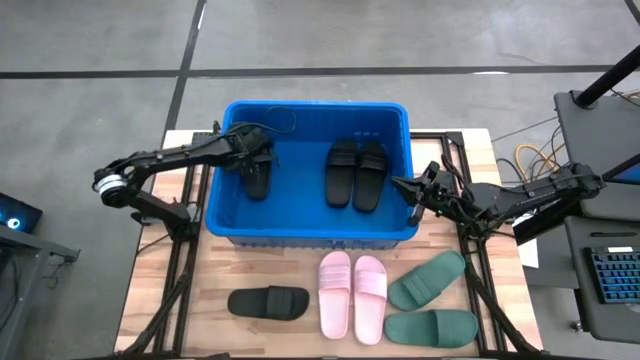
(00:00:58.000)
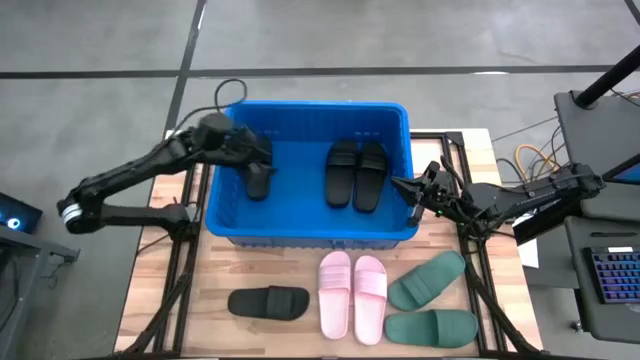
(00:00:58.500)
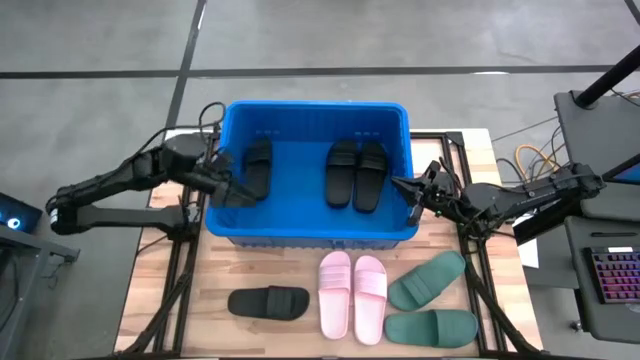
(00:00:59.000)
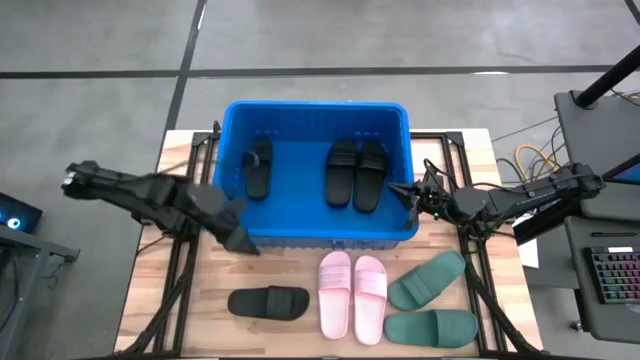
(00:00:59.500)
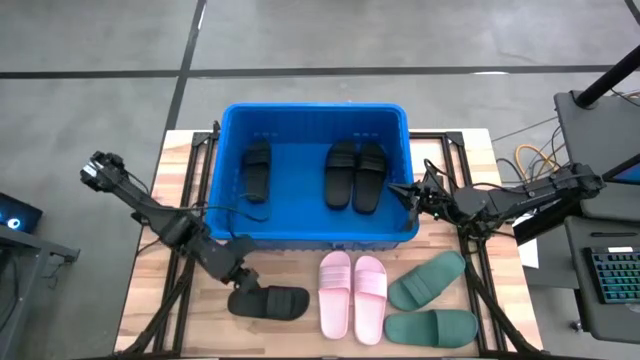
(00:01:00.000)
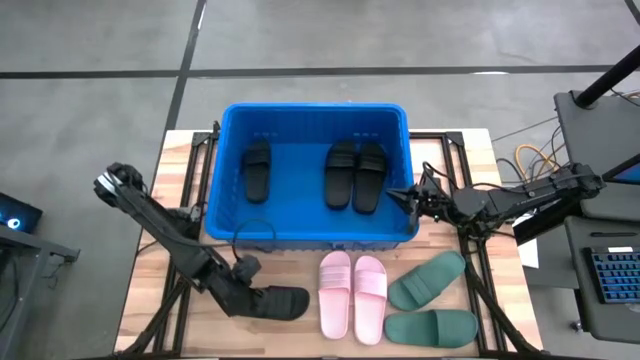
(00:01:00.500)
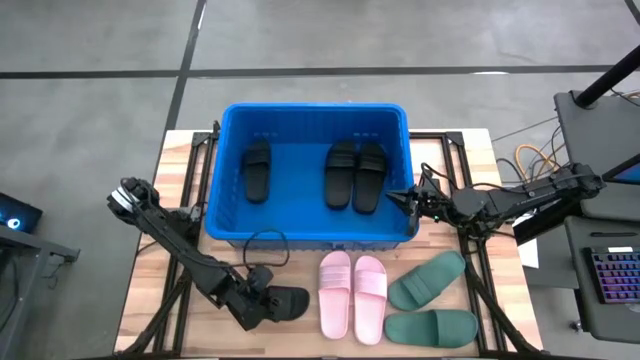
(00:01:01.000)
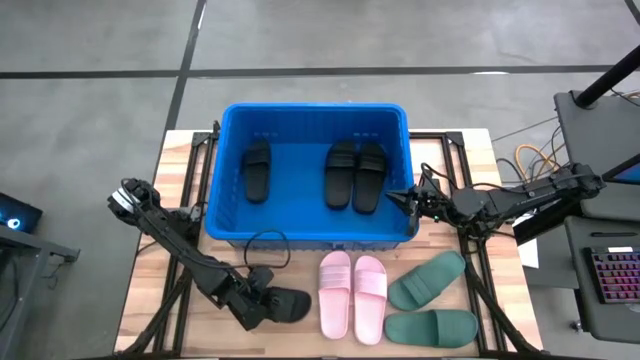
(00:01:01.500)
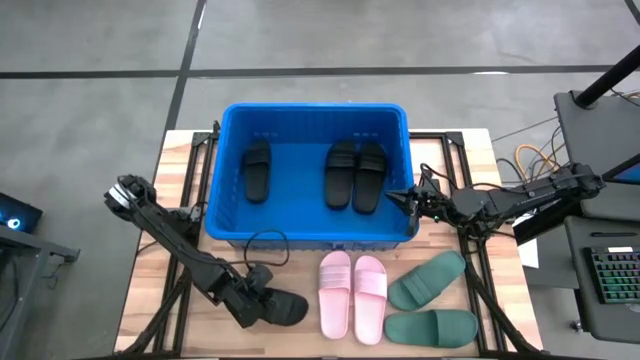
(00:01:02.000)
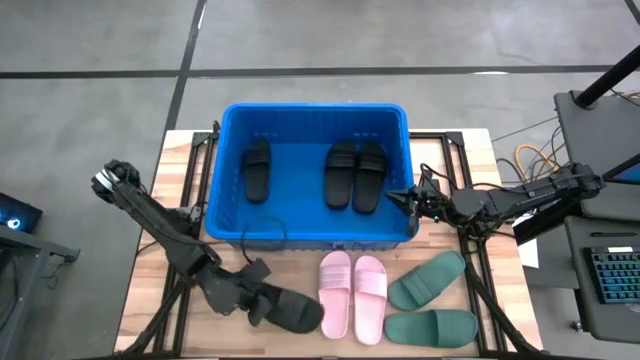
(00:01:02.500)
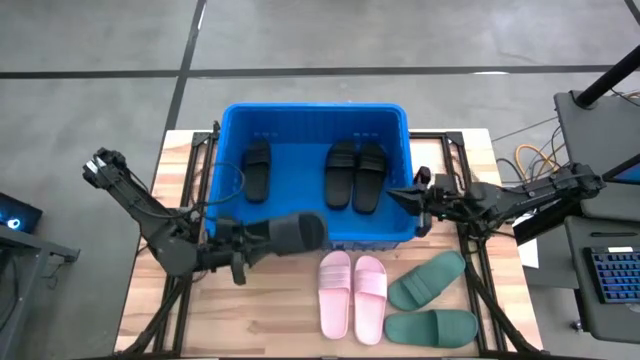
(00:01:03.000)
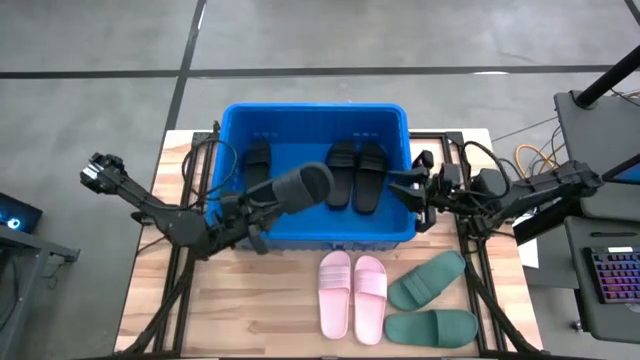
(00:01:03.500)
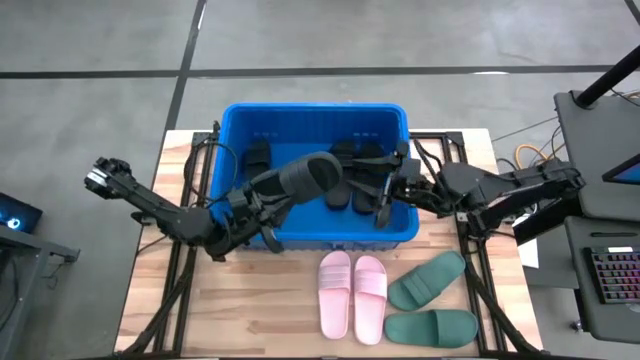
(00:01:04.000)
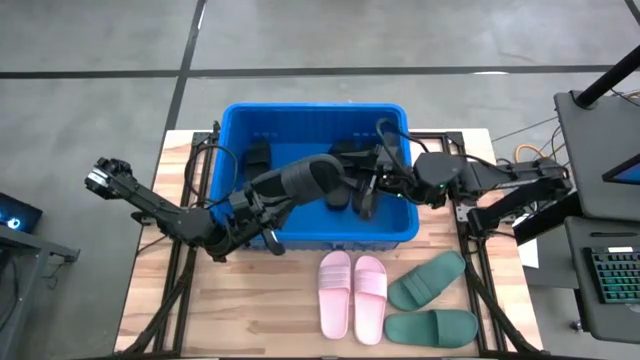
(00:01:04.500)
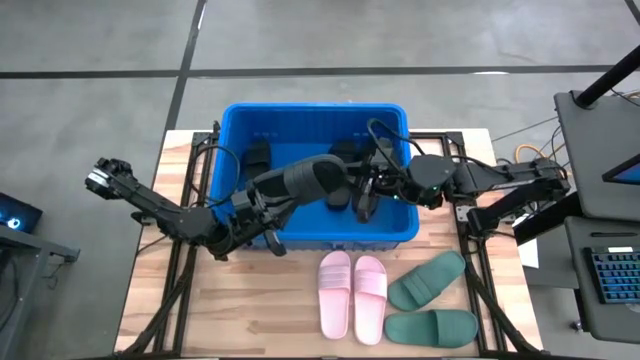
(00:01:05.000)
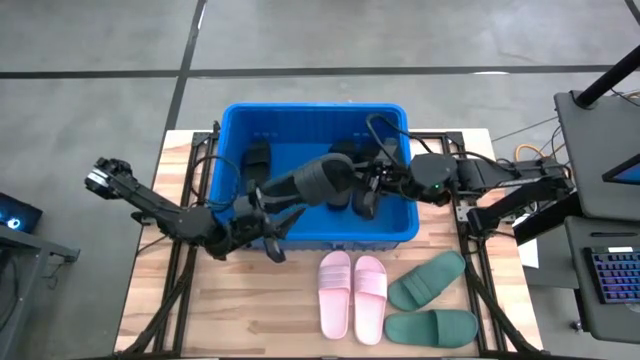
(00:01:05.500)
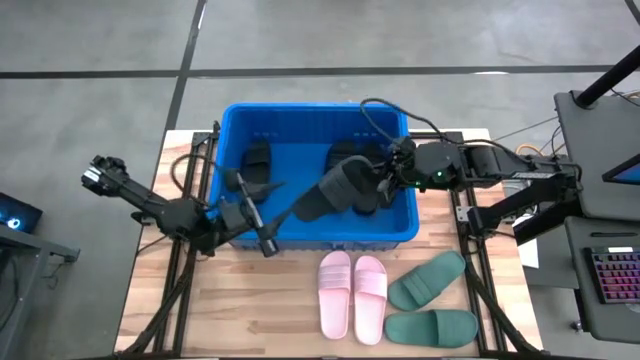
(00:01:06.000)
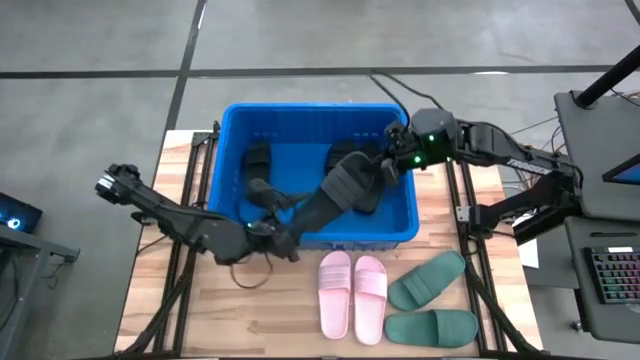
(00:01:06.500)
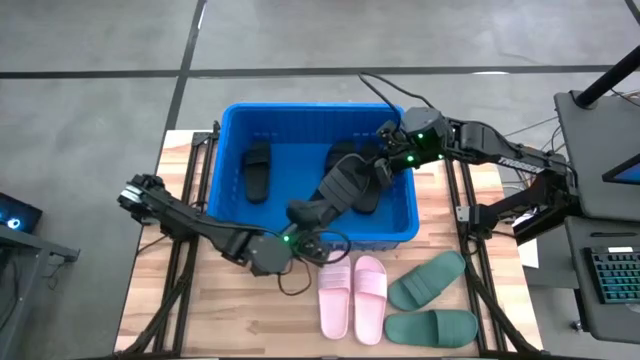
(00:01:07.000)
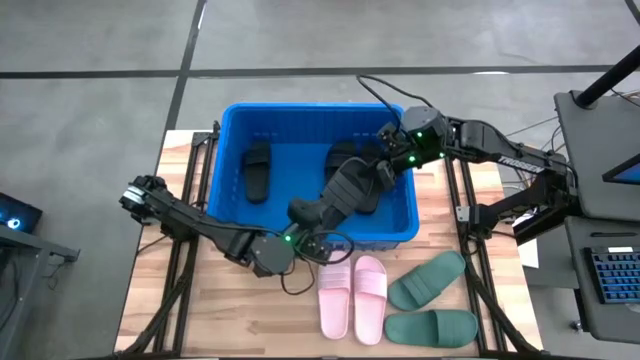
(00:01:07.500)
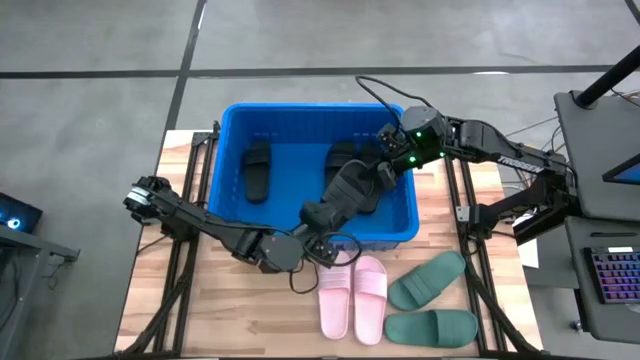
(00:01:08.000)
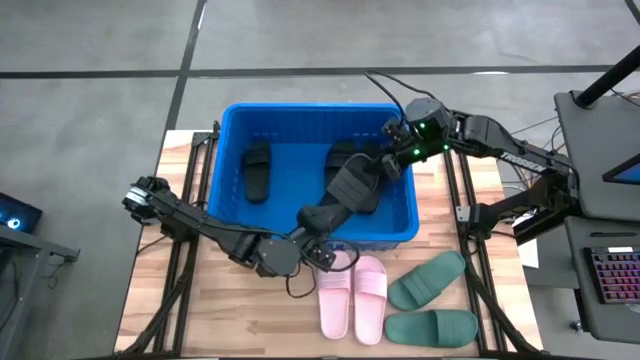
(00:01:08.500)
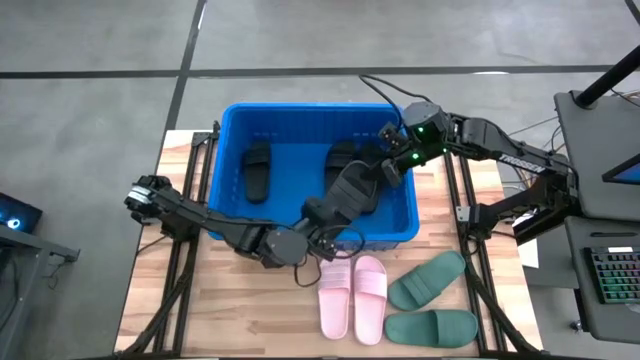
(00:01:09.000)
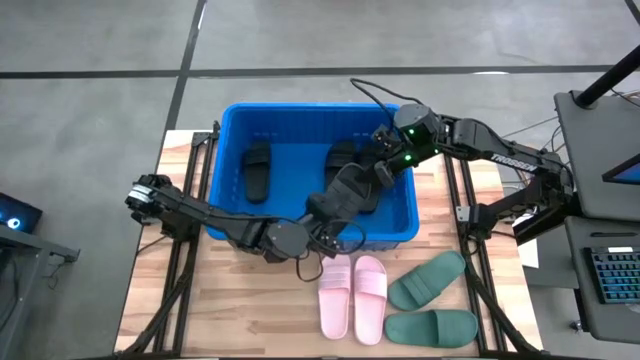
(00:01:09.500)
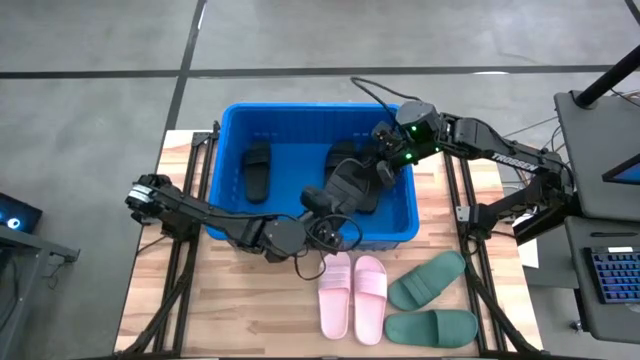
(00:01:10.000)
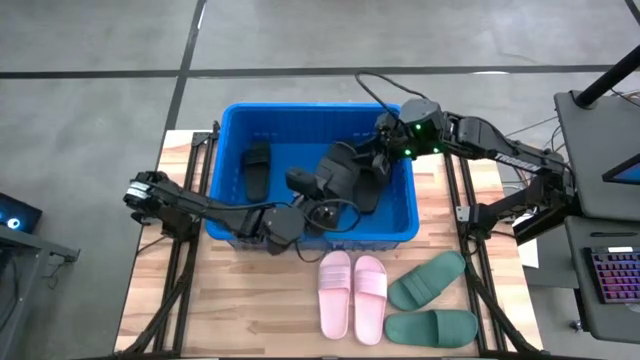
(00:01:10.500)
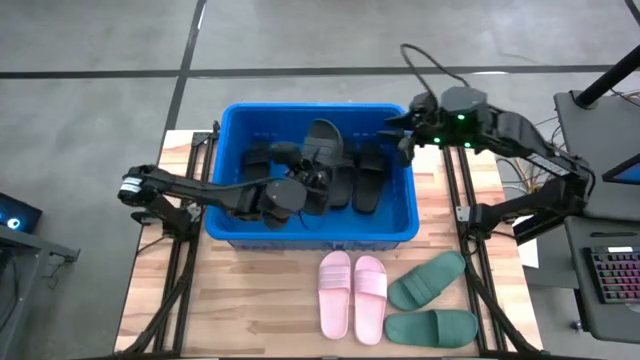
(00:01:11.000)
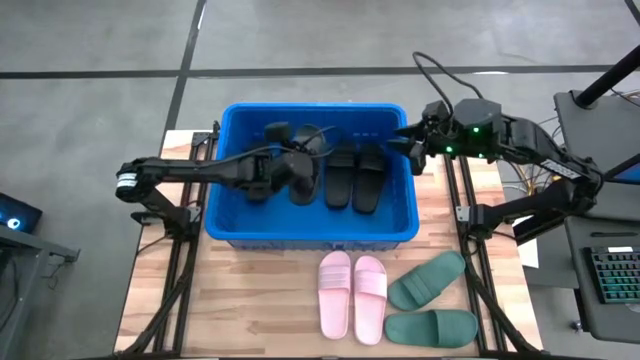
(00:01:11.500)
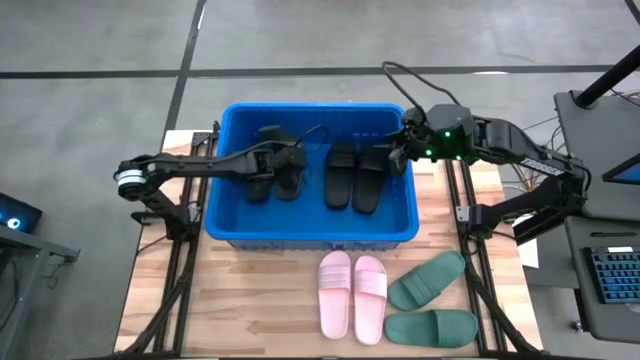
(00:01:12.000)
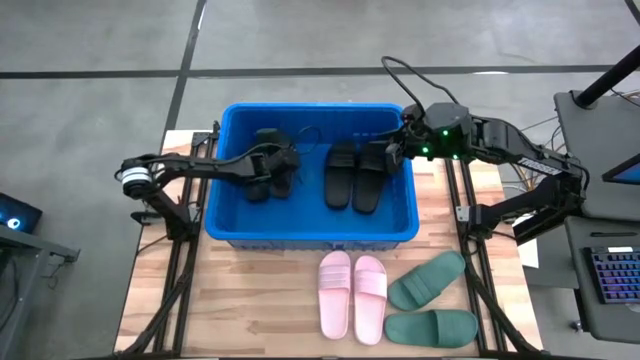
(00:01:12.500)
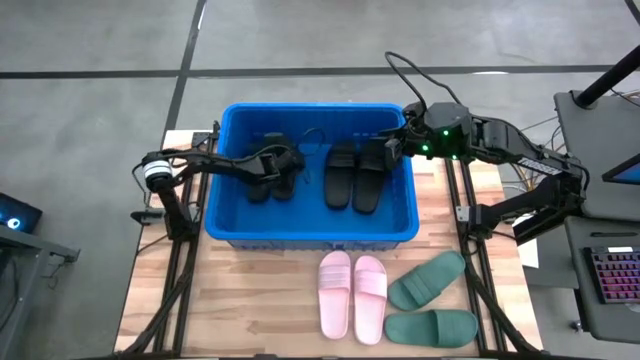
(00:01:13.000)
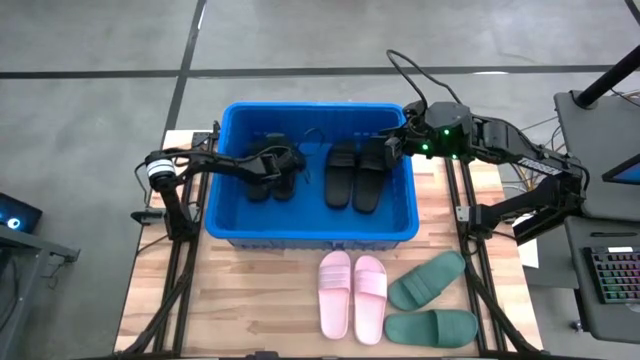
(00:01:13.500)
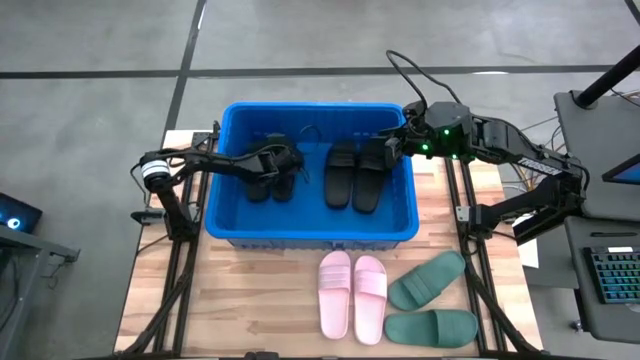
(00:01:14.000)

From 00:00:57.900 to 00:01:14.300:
Task: Pick and place slides into bin
Put the black slide into the blue bin
